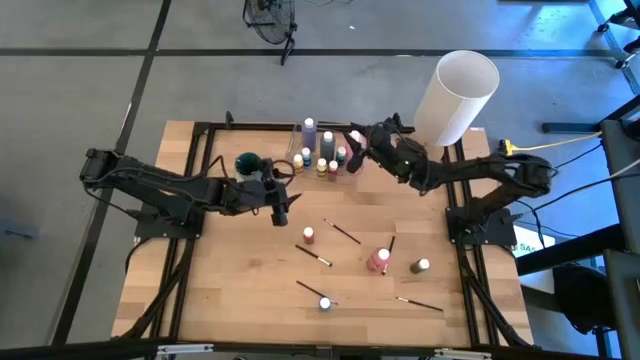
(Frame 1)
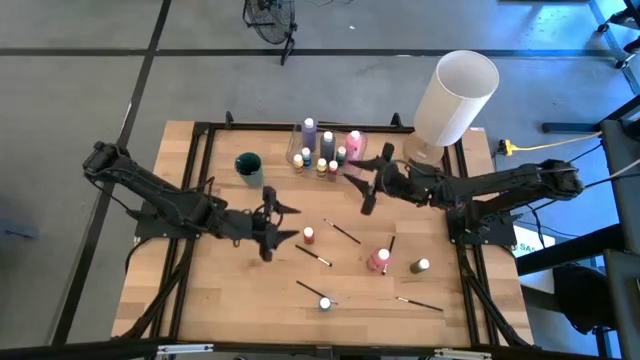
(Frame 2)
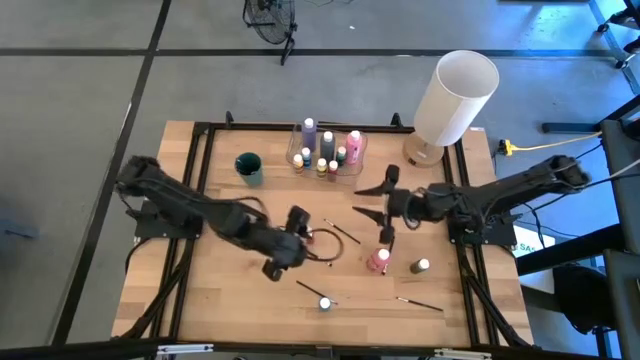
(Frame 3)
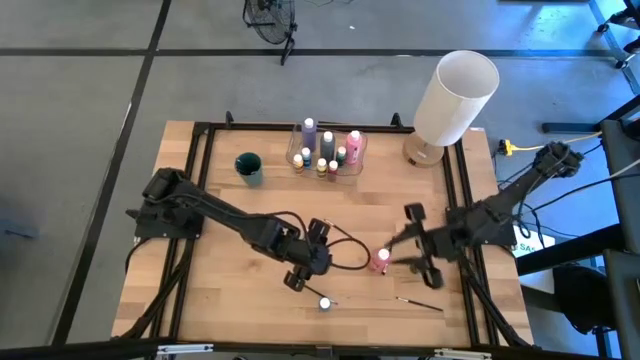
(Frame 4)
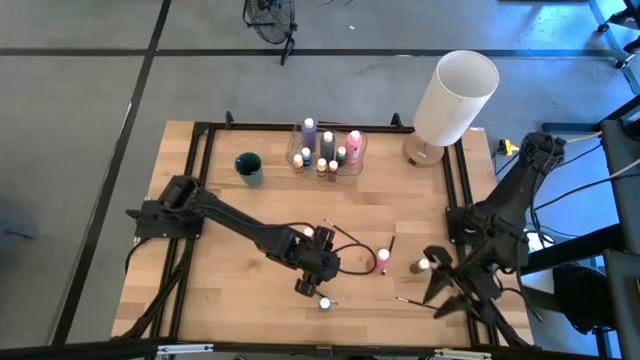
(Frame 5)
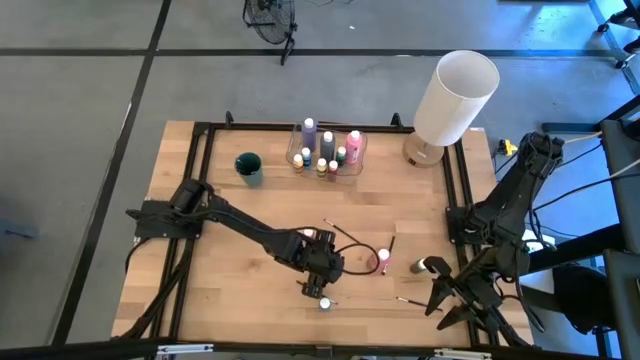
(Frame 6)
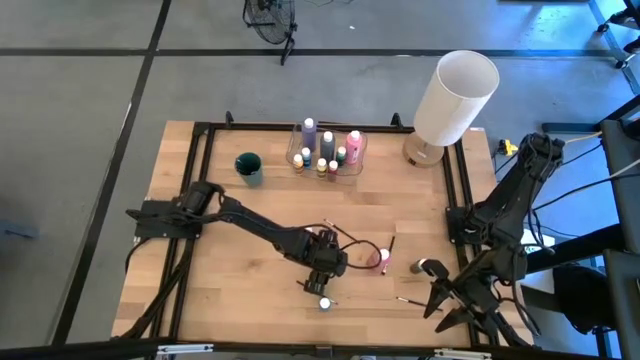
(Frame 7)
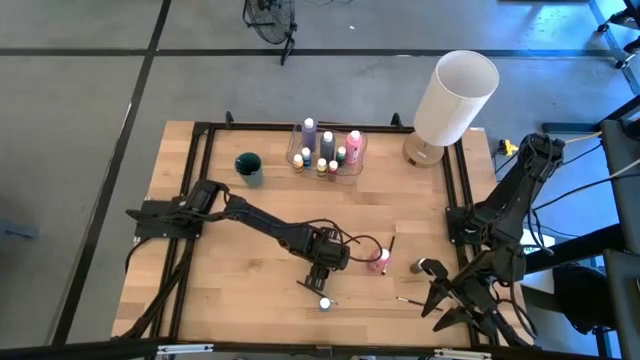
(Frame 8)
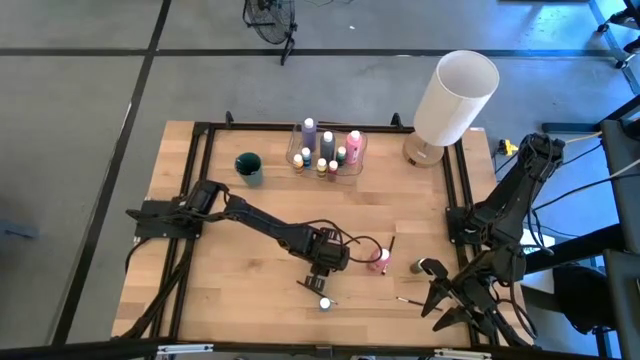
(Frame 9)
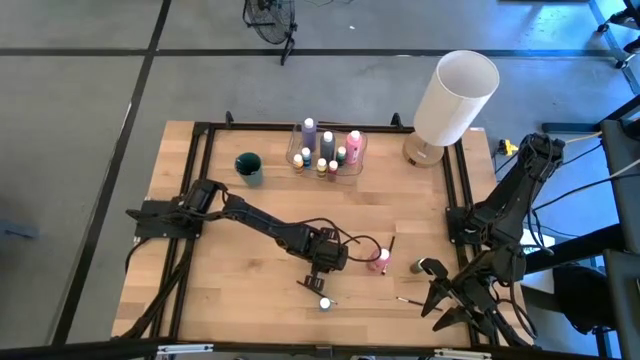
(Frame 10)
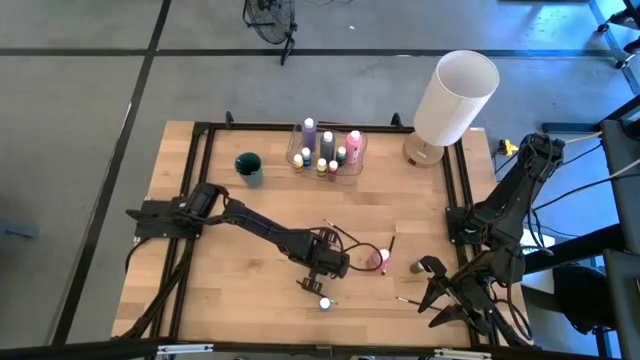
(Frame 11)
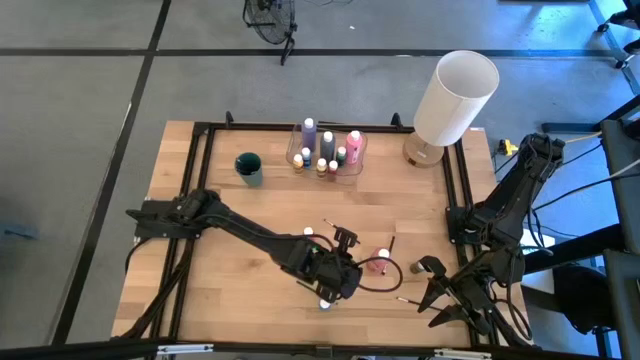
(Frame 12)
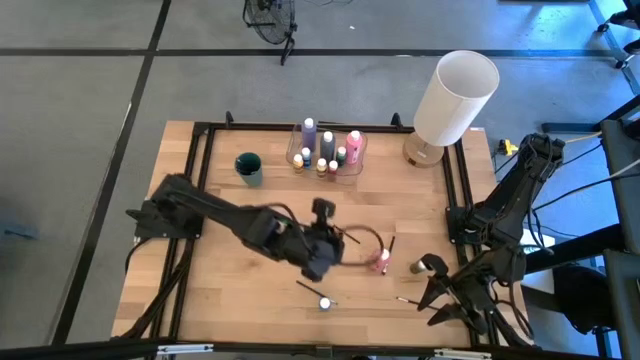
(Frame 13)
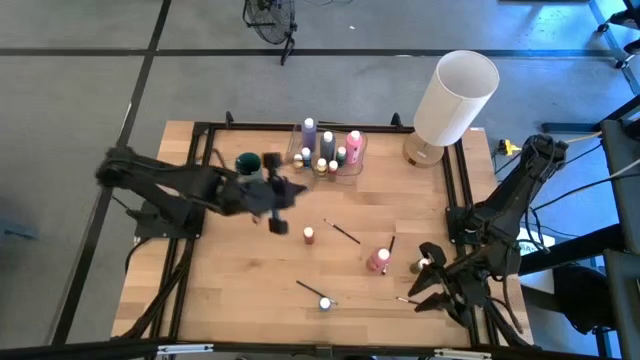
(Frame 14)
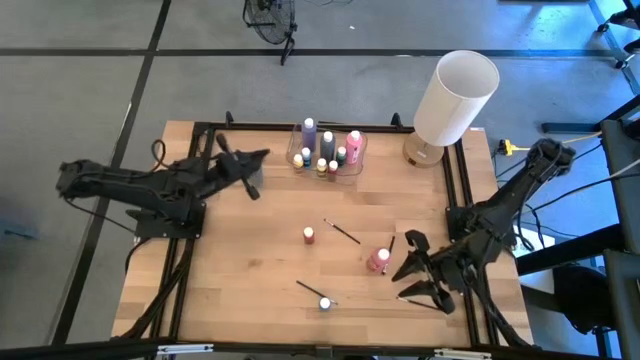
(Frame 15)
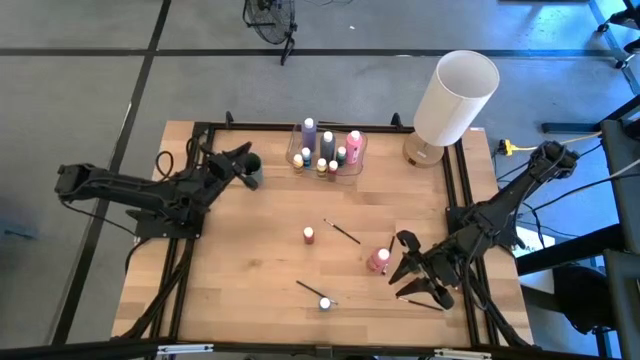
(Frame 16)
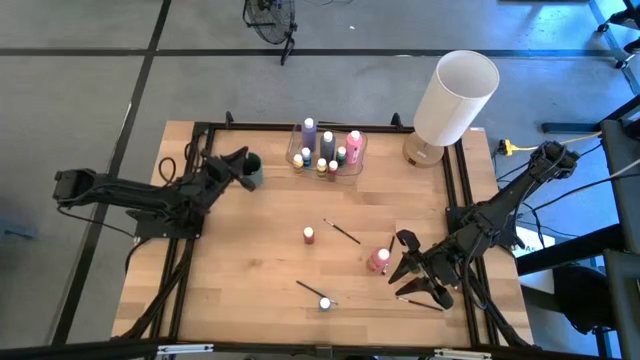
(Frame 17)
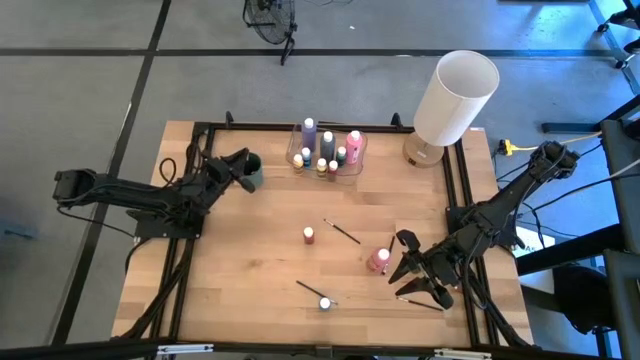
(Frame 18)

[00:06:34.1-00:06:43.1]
Task: Pick & Place Paint Supplies
Put the silver paint brush into the green cup

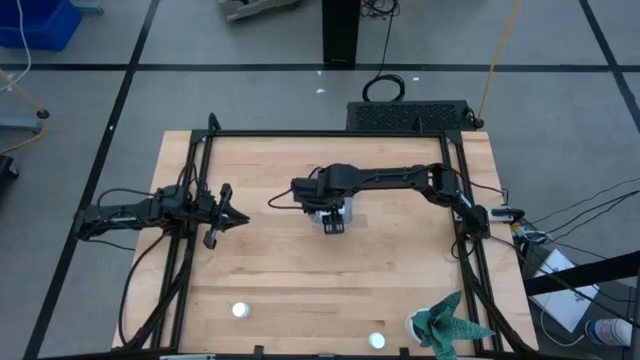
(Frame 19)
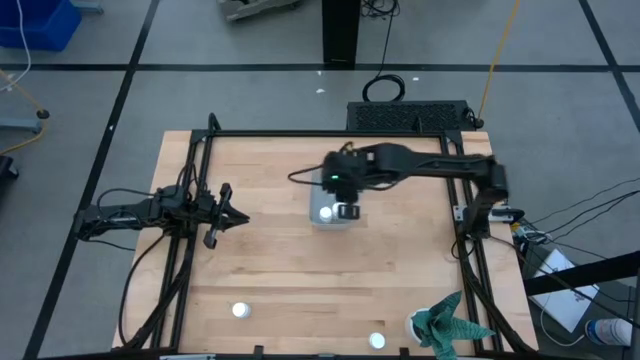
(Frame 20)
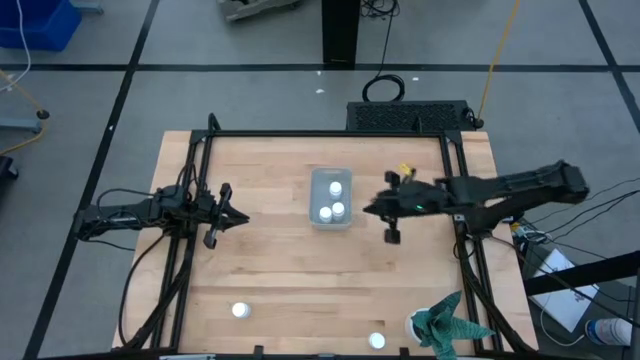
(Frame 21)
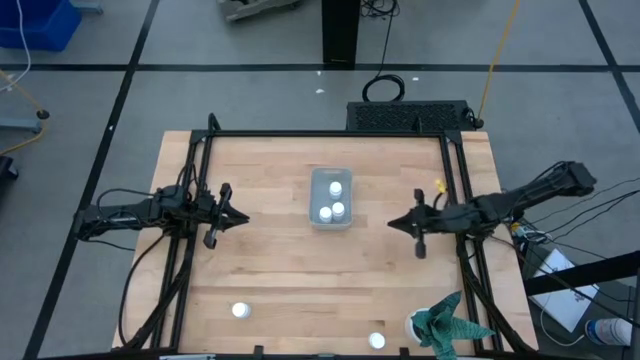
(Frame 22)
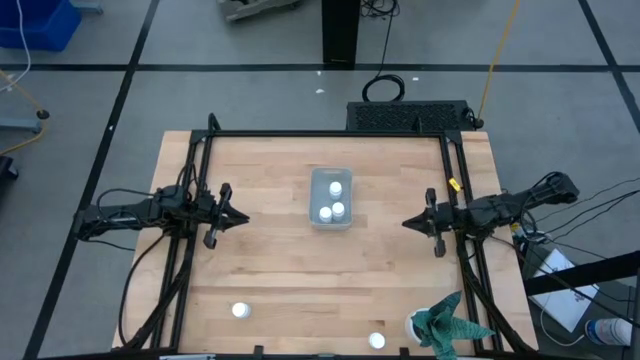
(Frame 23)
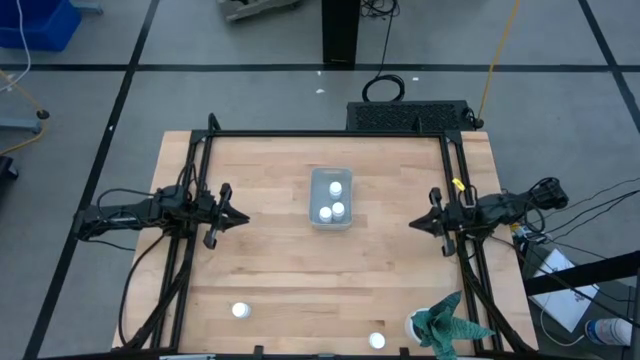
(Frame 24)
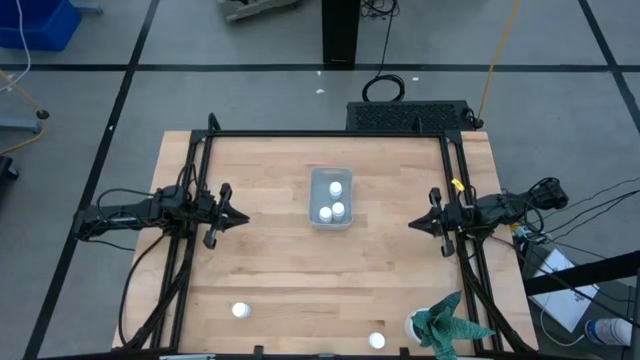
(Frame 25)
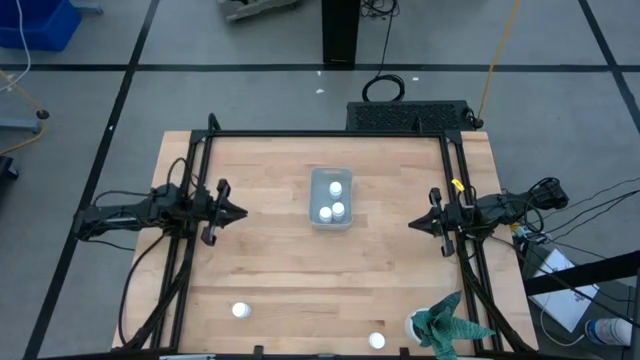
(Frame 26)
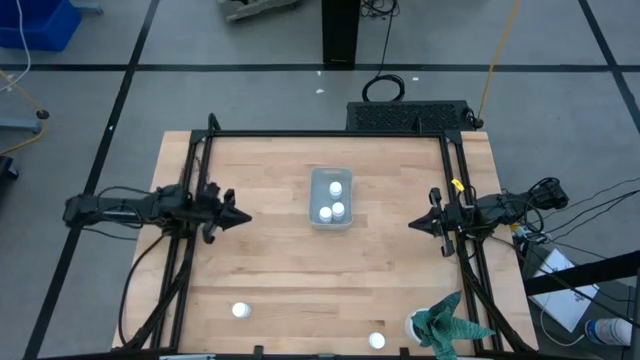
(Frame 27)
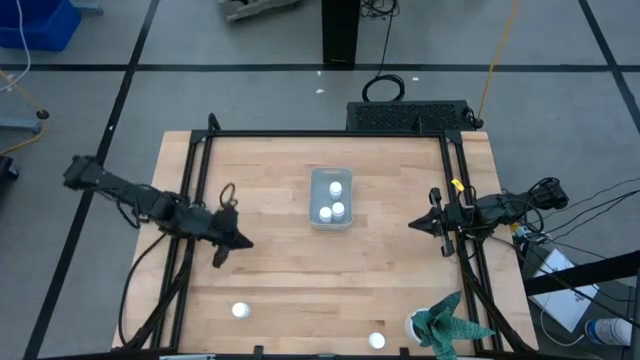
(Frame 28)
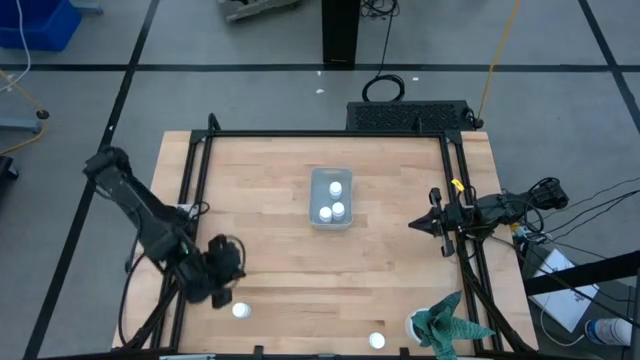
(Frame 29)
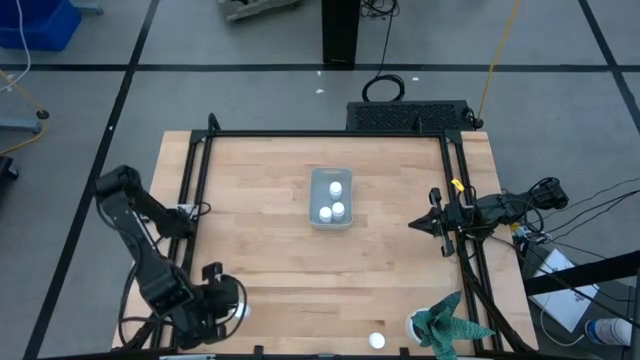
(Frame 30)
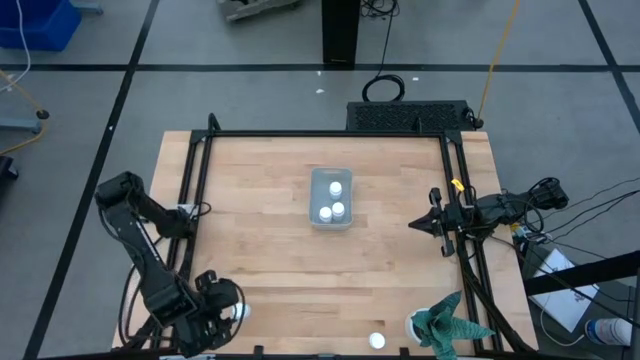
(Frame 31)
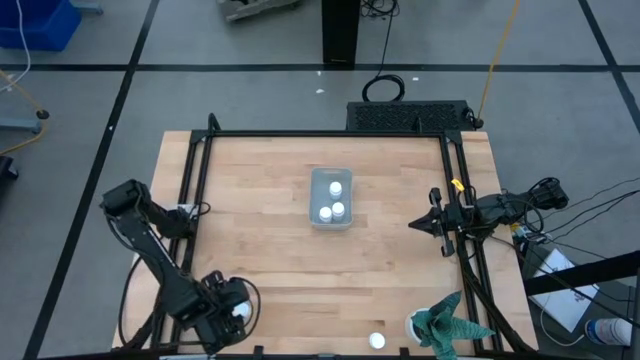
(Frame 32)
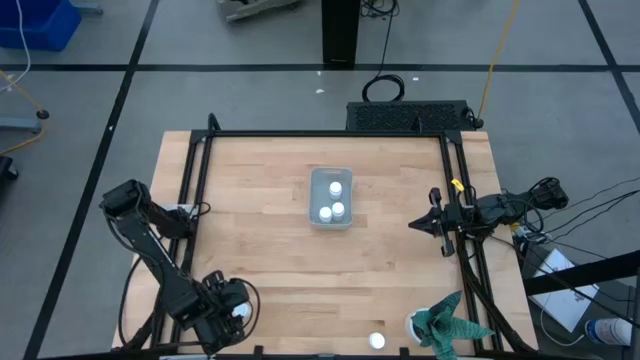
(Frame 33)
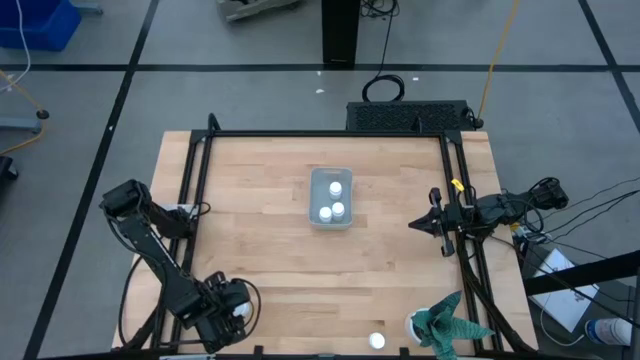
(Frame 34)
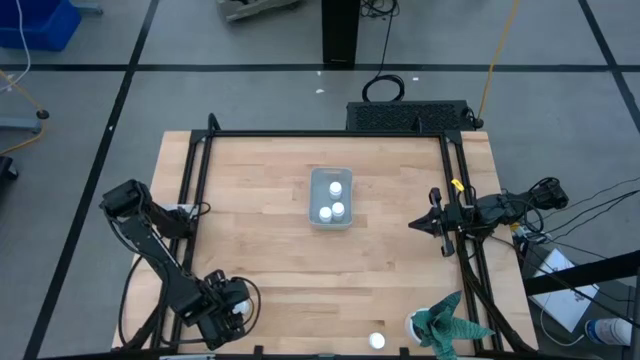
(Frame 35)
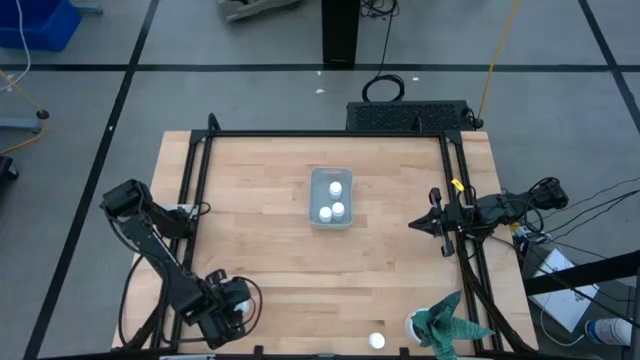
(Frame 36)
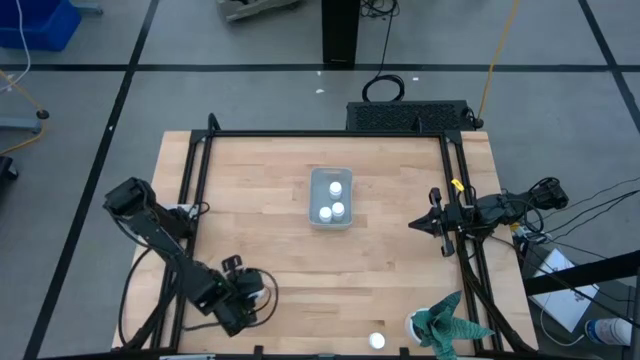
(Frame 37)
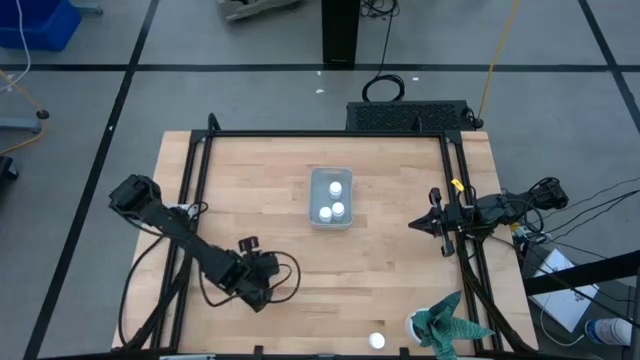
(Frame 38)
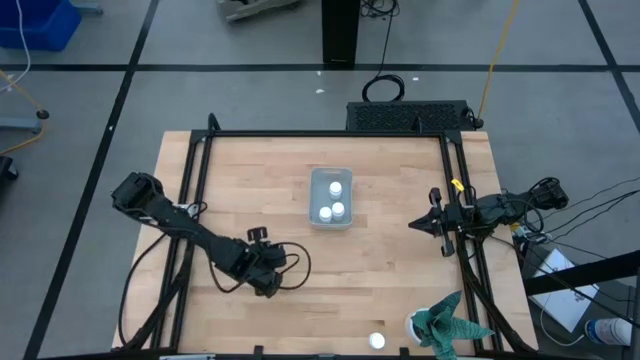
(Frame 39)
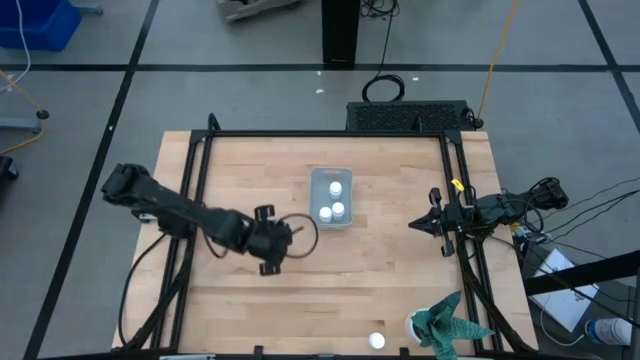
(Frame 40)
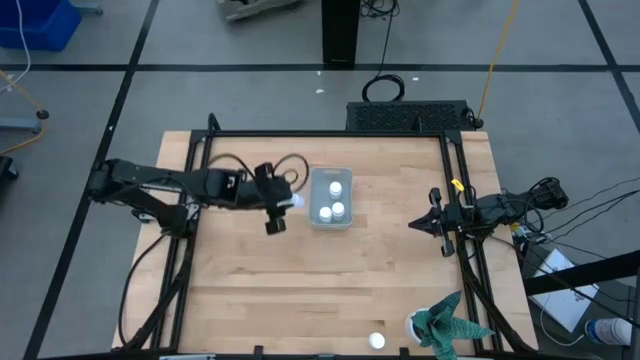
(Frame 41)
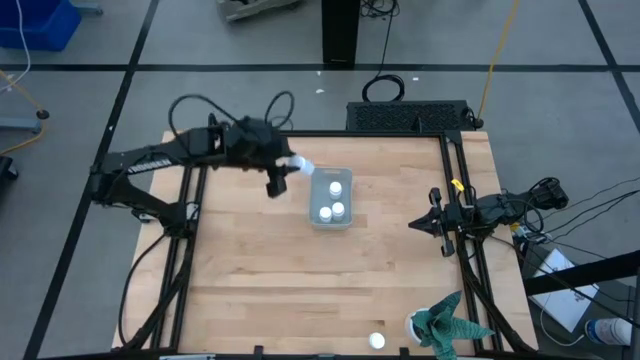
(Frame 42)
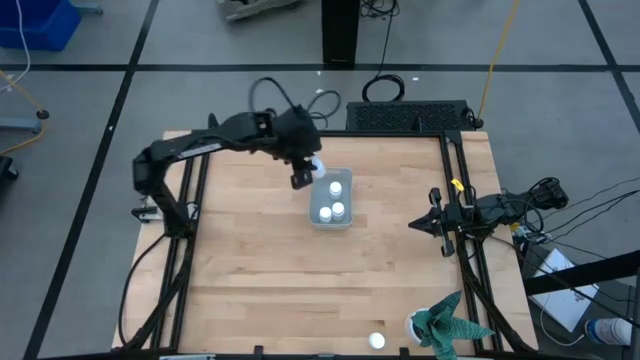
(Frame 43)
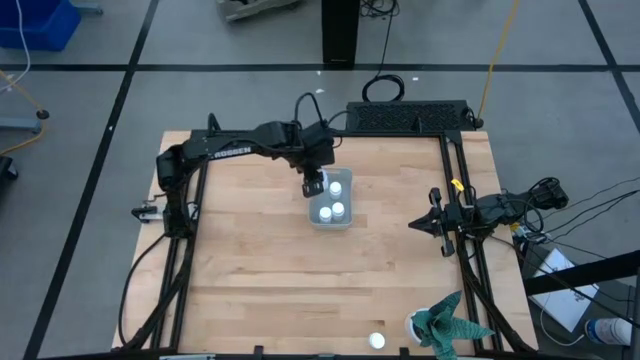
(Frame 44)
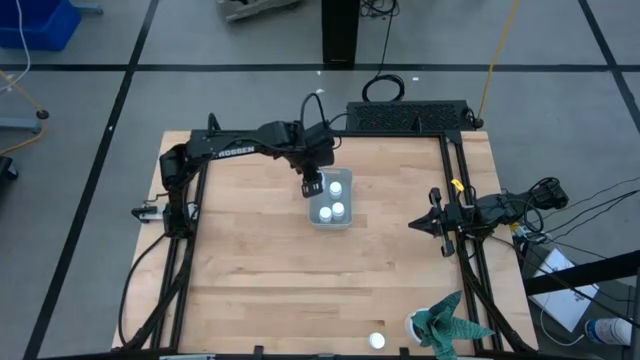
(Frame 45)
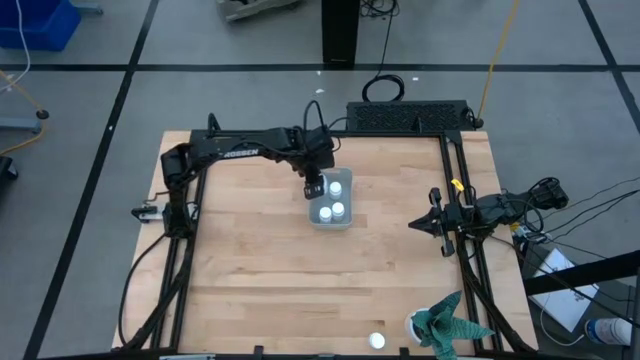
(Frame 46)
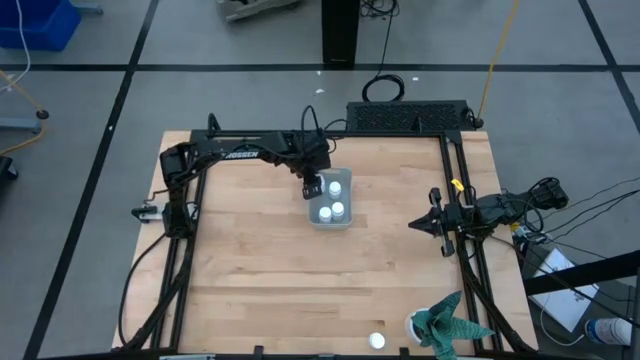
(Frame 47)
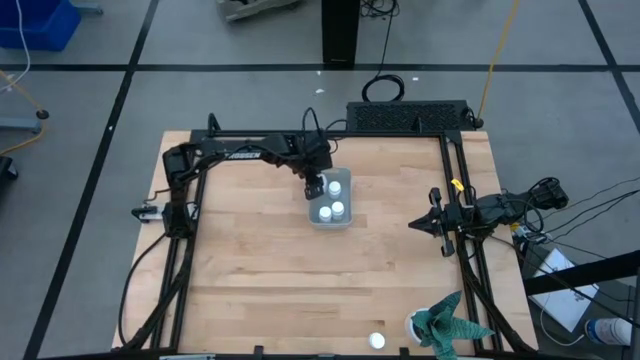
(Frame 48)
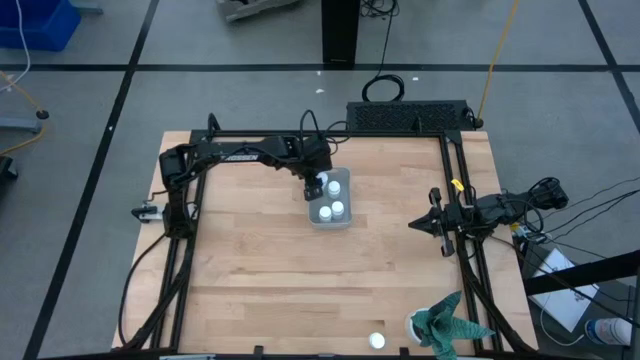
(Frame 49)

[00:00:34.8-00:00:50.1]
Task: Pick and place pill bottles into a basket
Put the white pill bottle into the gray bin
